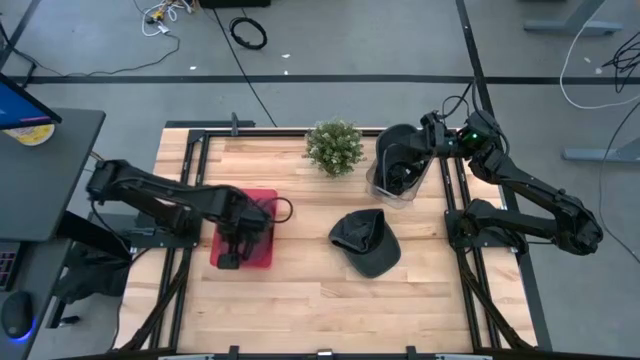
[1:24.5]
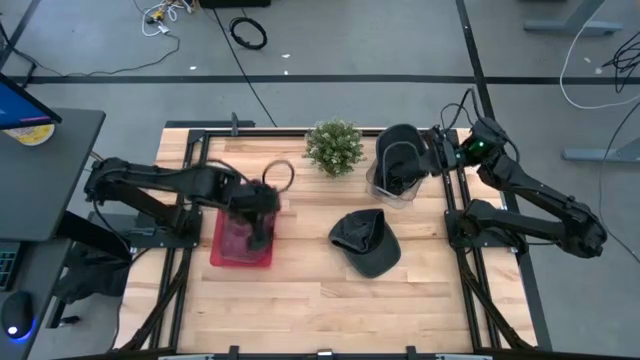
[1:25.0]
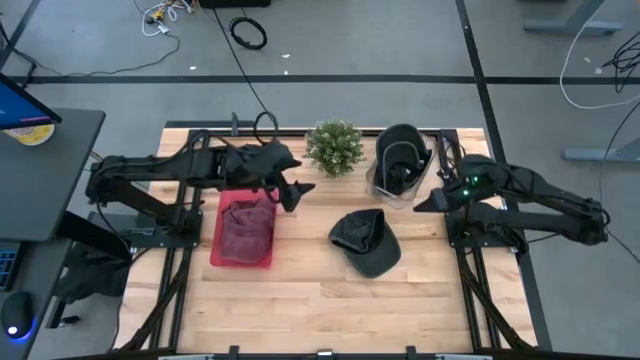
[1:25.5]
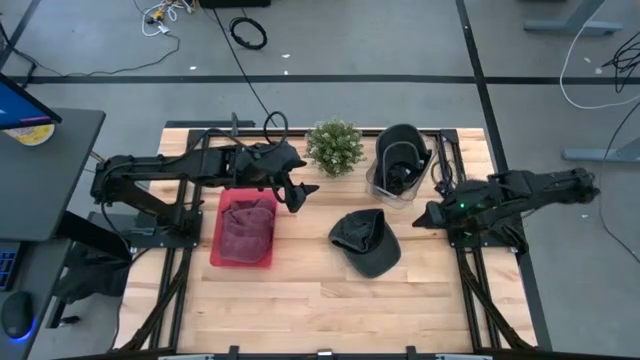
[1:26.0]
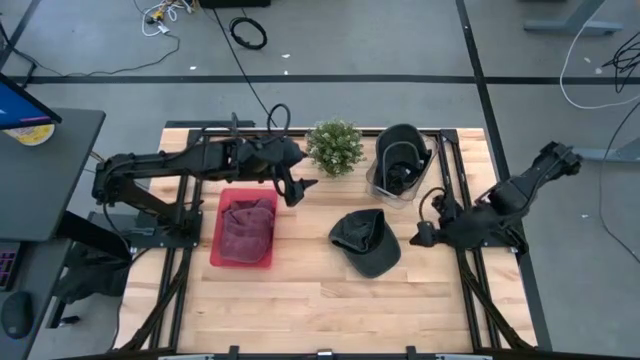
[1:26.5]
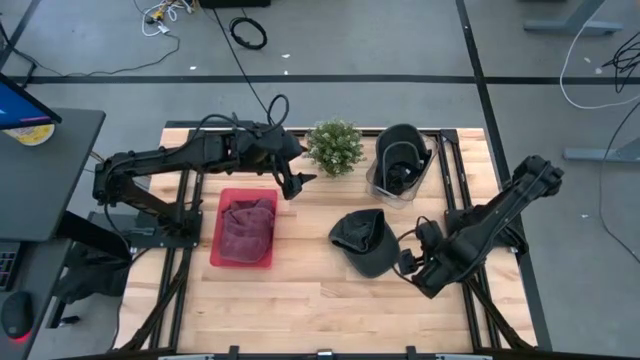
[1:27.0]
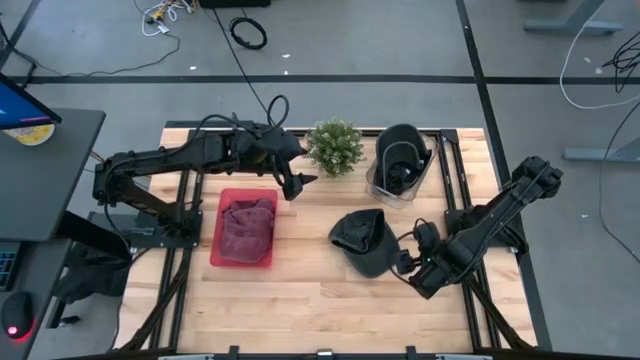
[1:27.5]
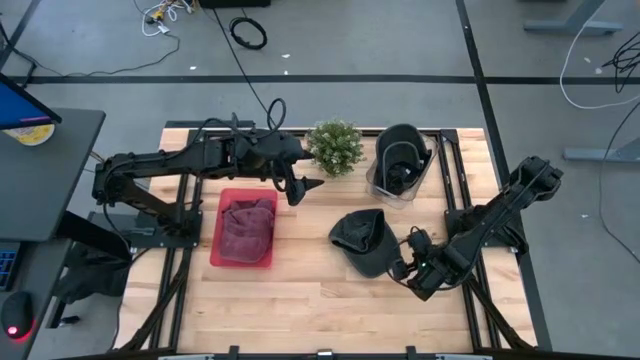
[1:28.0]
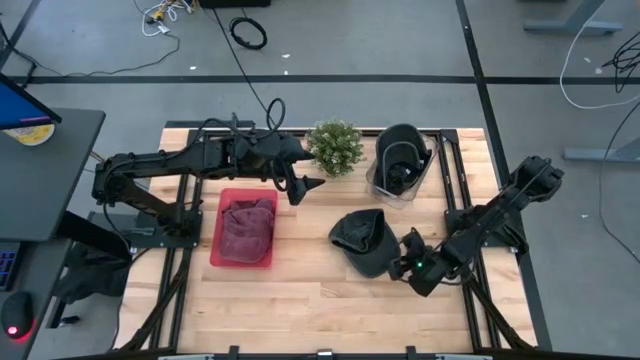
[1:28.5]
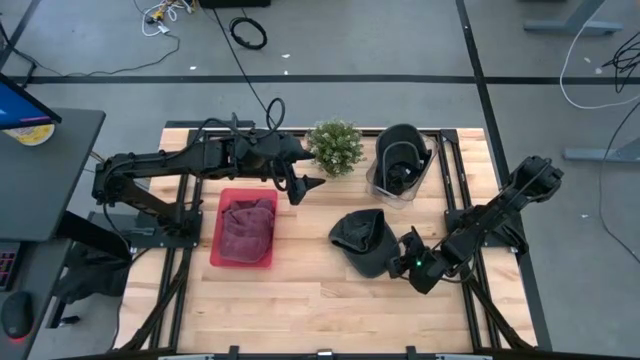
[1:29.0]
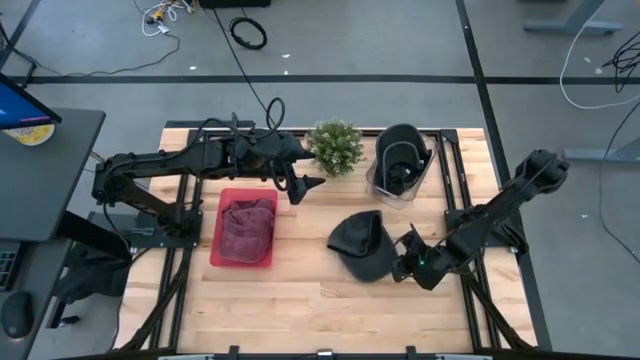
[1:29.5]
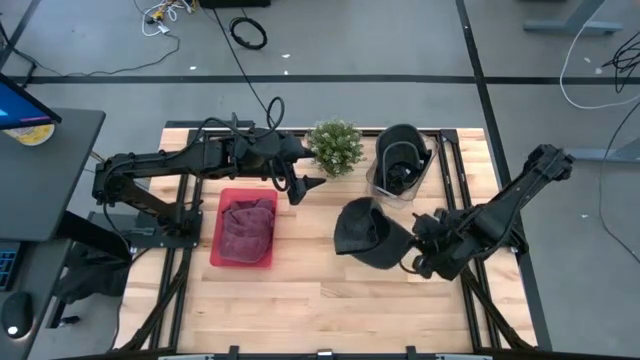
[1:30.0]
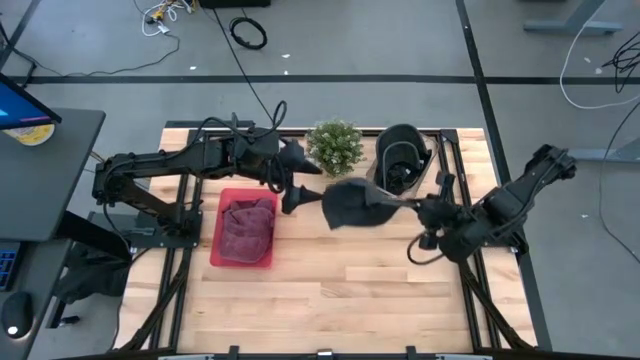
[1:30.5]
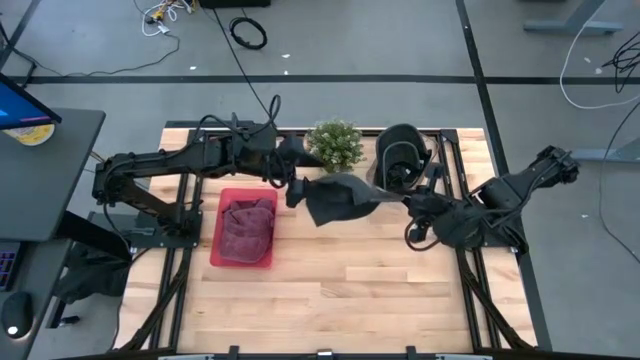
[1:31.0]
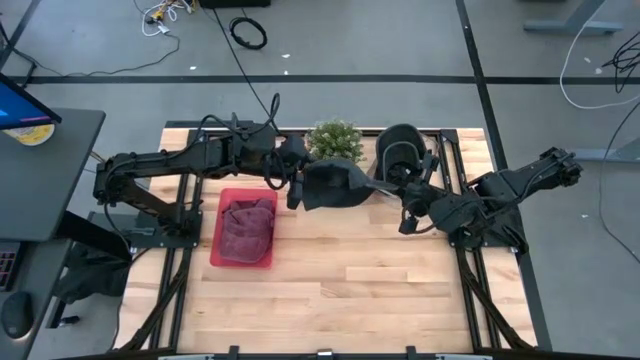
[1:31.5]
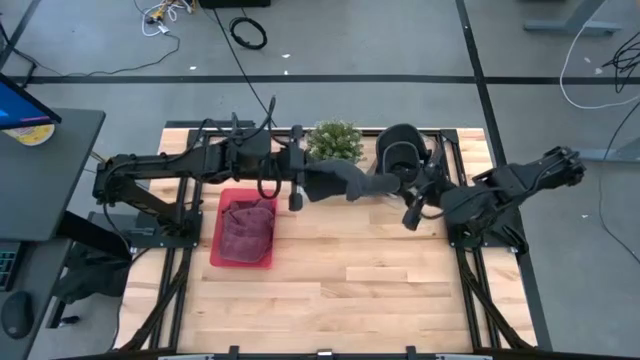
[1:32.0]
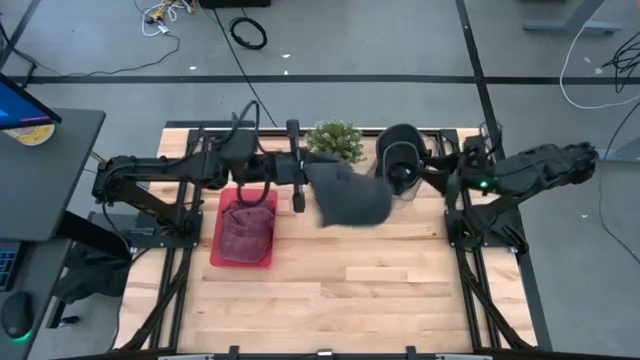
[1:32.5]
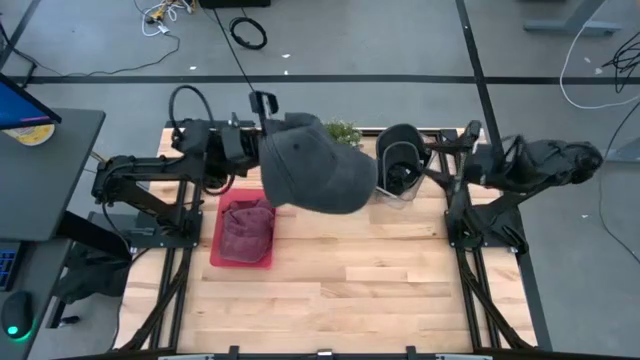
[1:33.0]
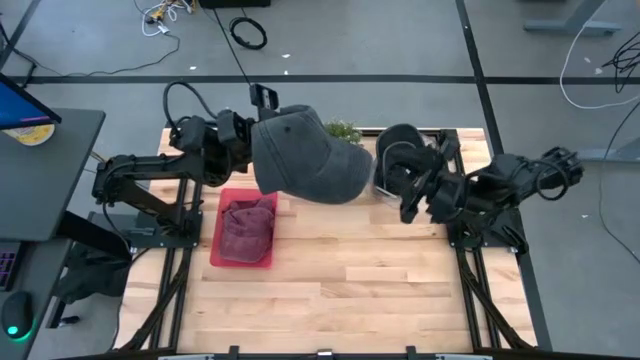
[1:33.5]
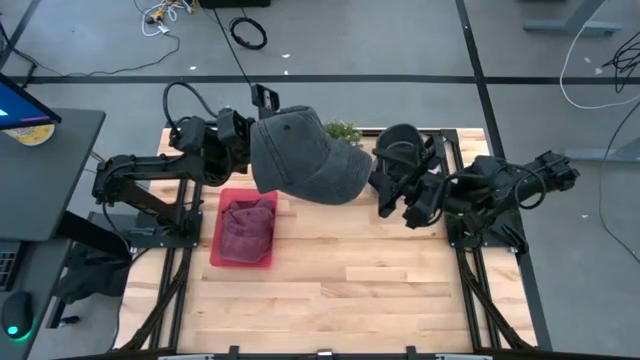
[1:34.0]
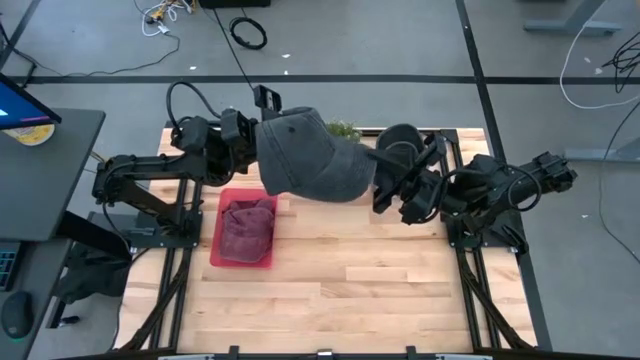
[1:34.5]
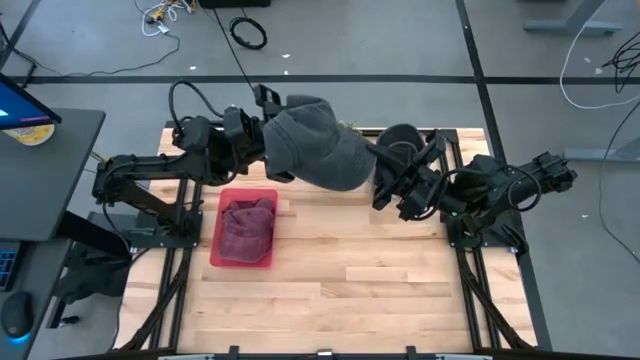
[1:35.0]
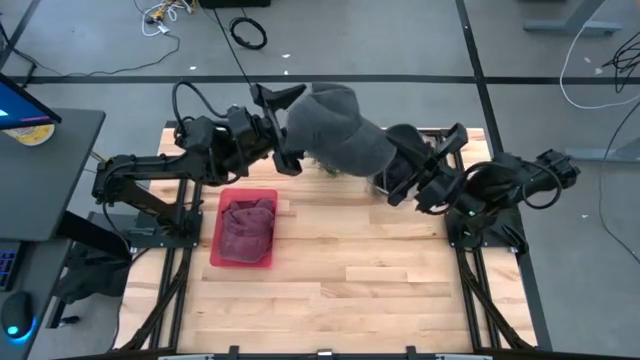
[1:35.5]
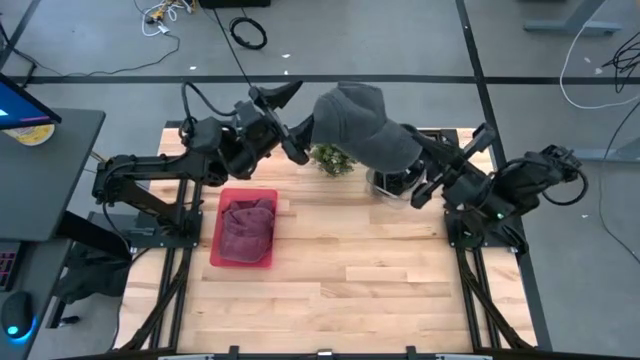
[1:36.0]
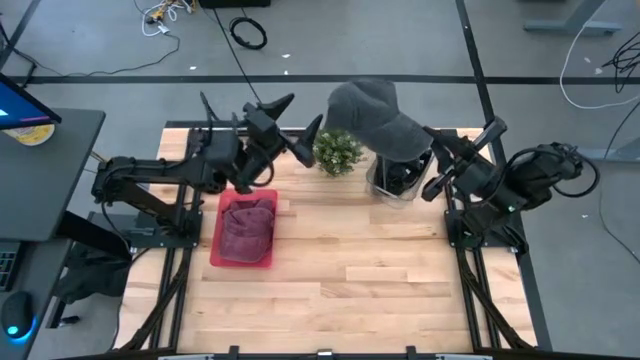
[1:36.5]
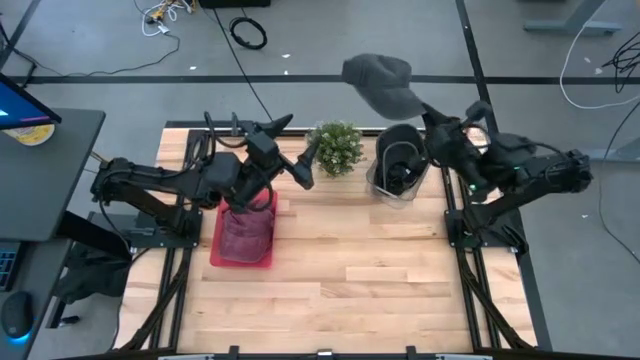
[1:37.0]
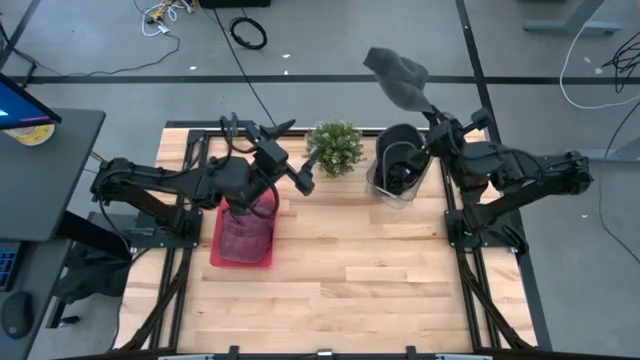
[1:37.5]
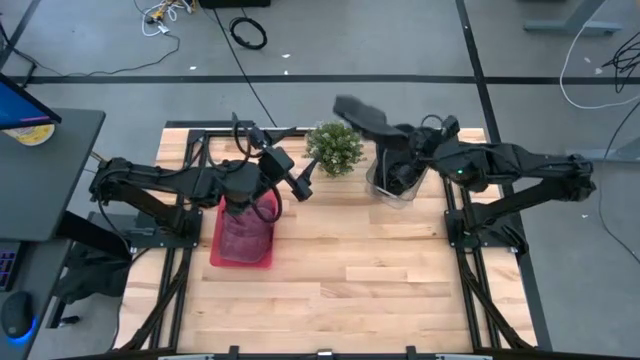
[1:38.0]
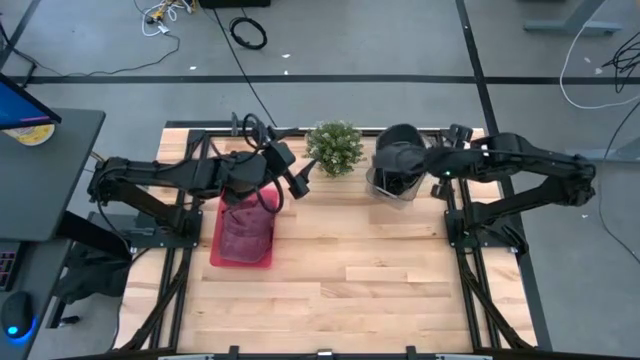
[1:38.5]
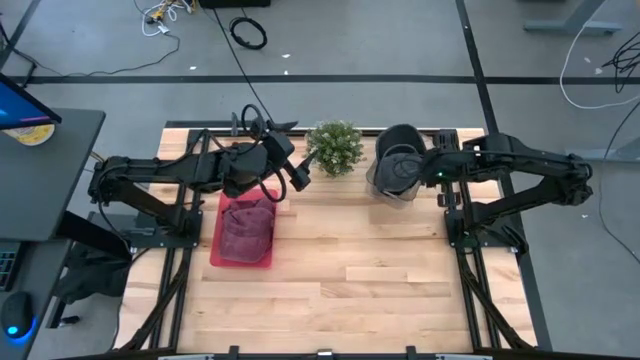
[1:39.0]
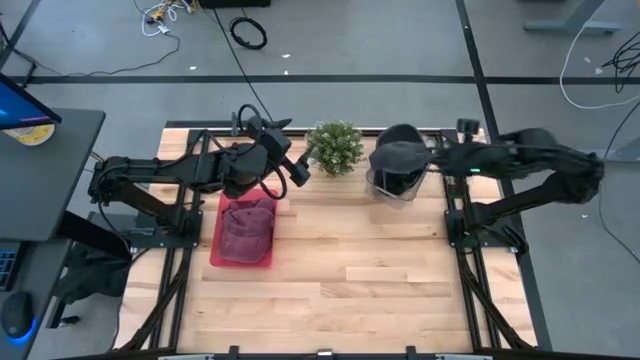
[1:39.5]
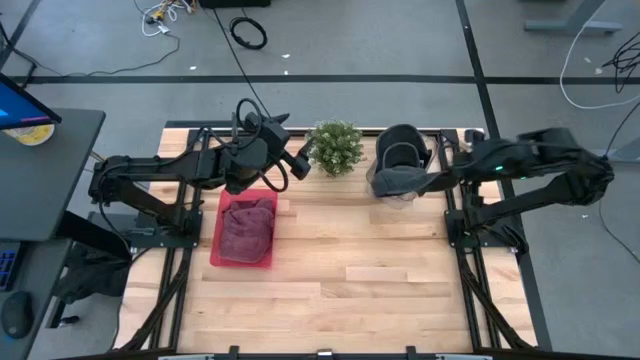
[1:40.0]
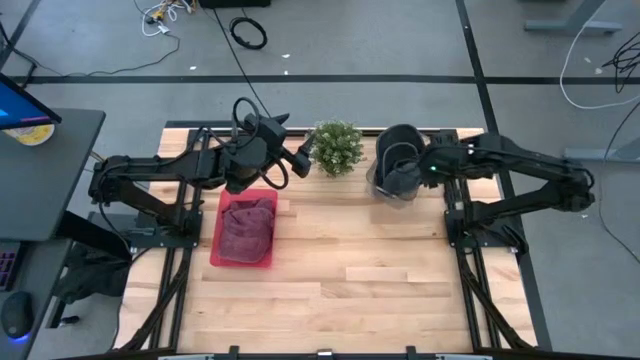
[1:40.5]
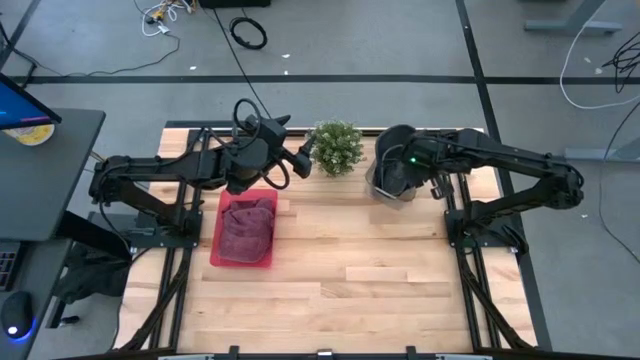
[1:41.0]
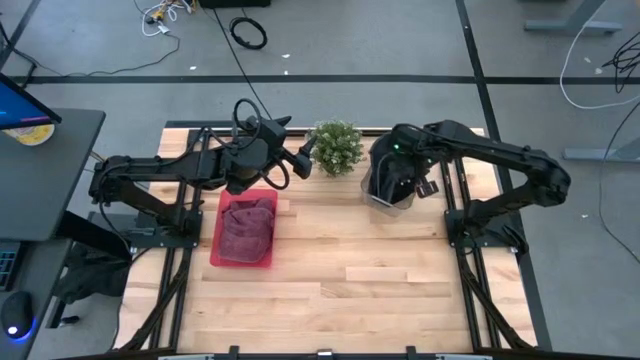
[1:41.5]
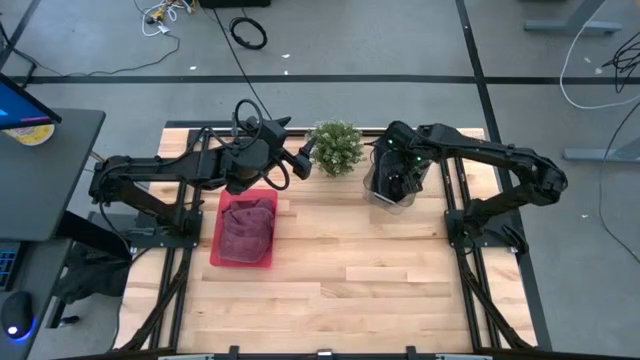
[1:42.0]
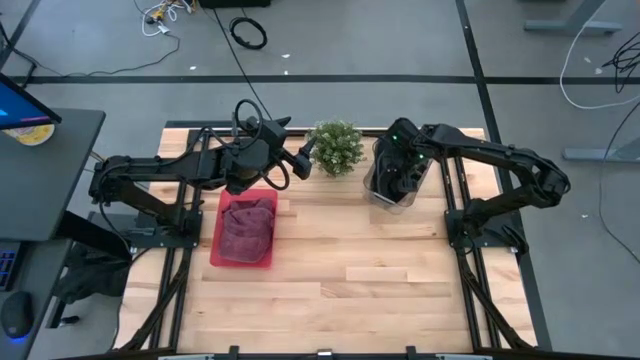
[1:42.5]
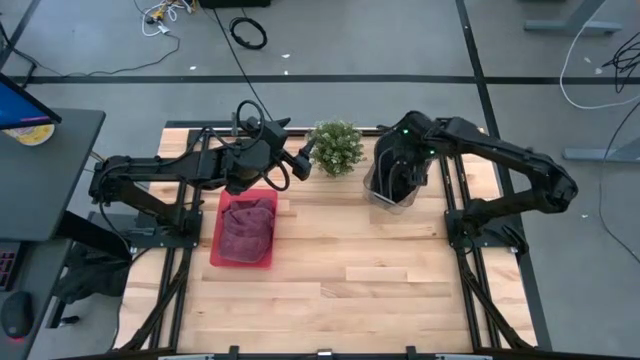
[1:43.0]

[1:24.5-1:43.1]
Task: Pick & Place hat
Put the black cap into the transparent bin

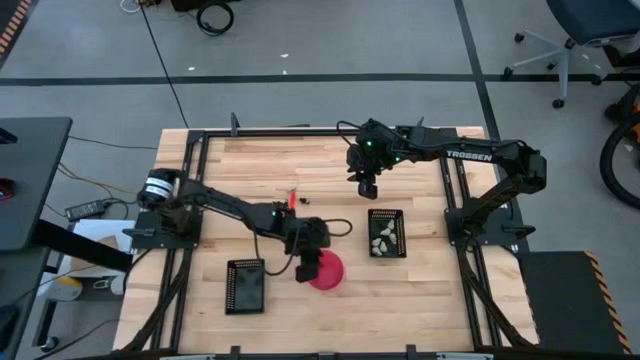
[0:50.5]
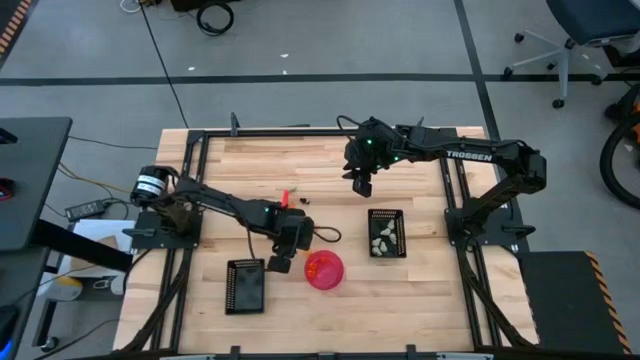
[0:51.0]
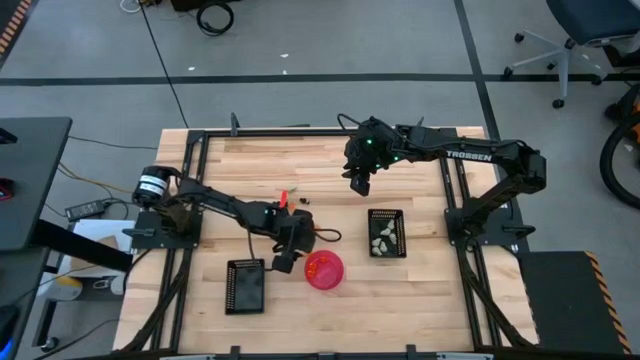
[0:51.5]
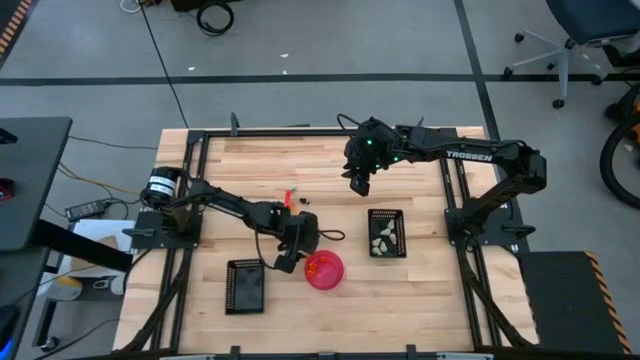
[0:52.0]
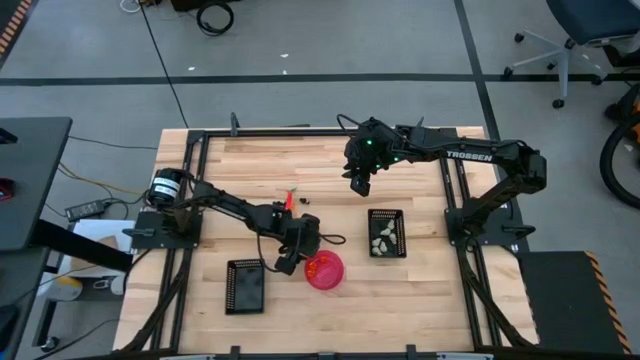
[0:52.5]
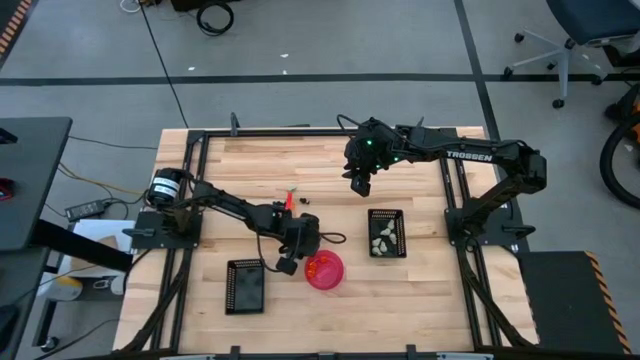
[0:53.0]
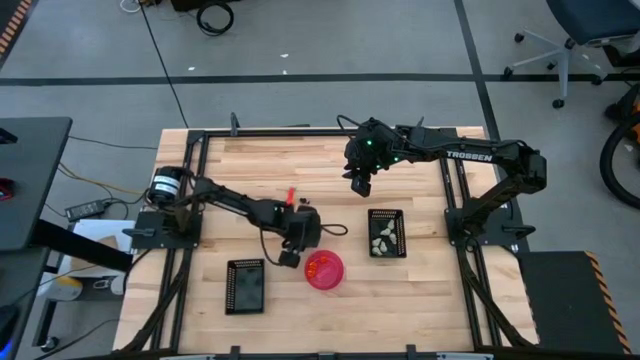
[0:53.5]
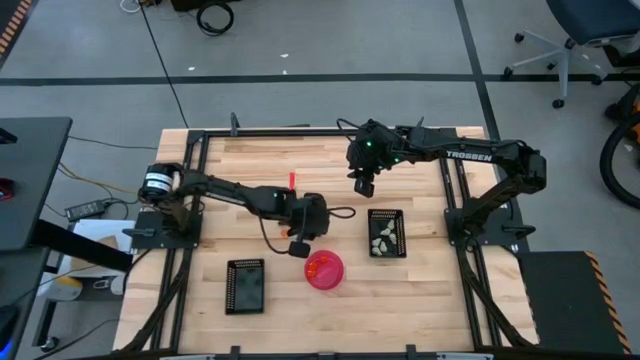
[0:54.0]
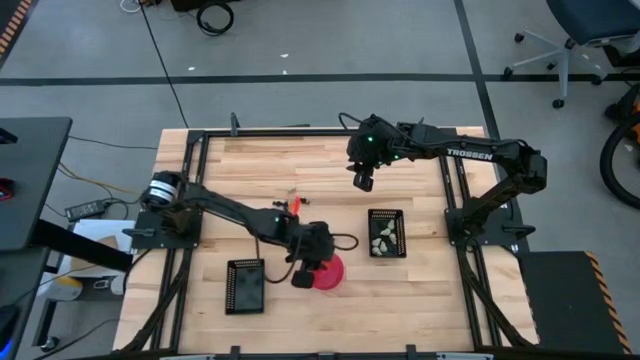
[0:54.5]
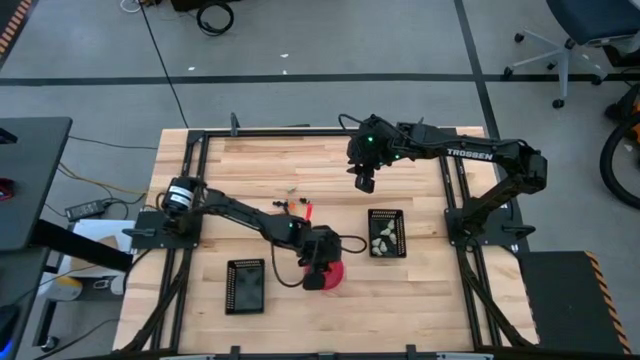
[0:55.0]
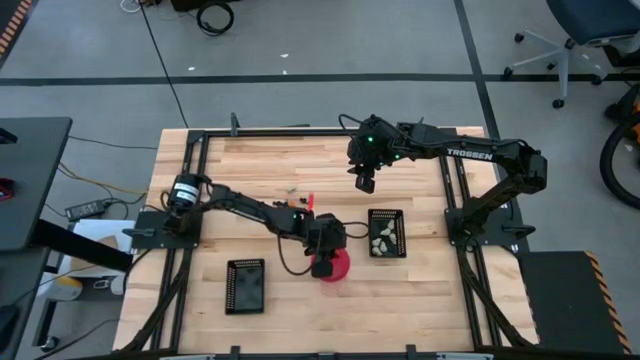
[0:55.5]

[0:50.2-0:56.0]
Task: Sort Halloween decoration
Put the orange pumpkin toy into the pink bowl
